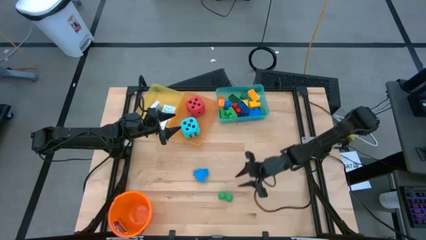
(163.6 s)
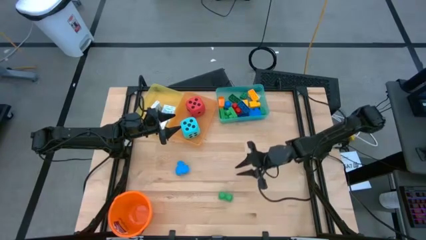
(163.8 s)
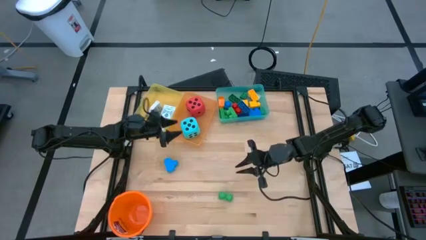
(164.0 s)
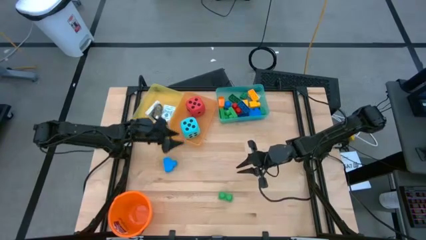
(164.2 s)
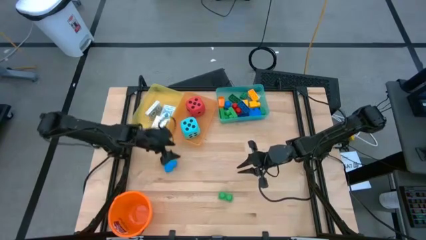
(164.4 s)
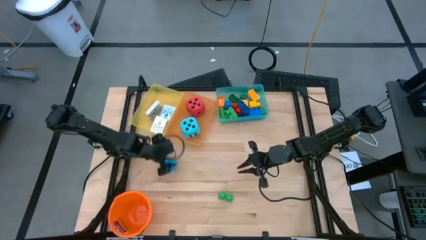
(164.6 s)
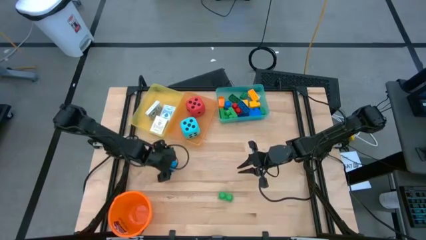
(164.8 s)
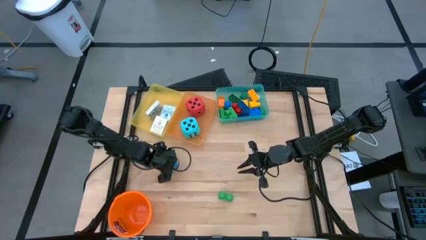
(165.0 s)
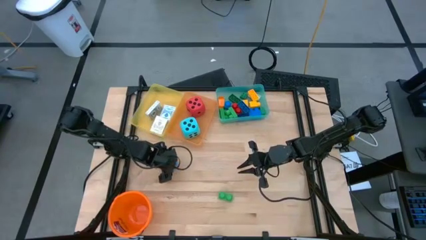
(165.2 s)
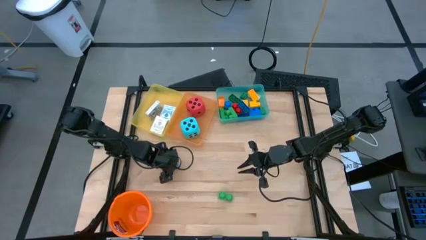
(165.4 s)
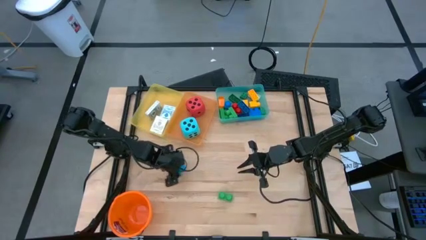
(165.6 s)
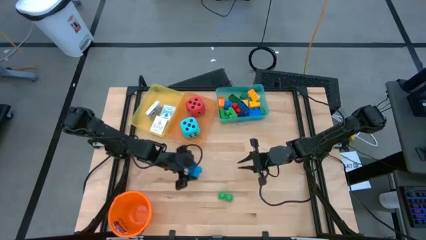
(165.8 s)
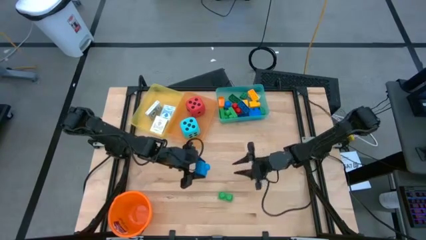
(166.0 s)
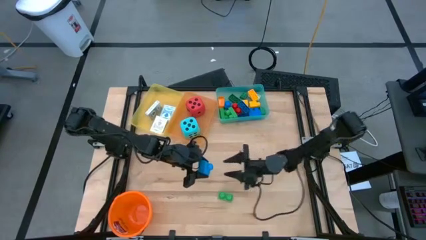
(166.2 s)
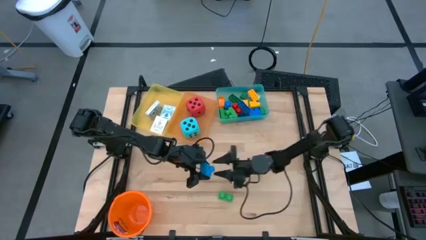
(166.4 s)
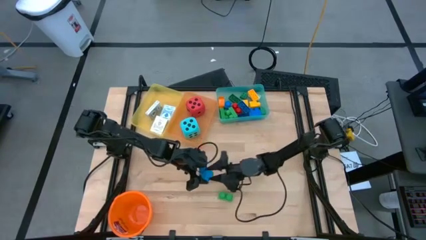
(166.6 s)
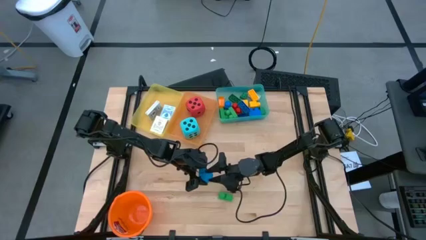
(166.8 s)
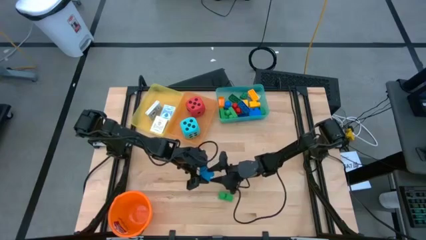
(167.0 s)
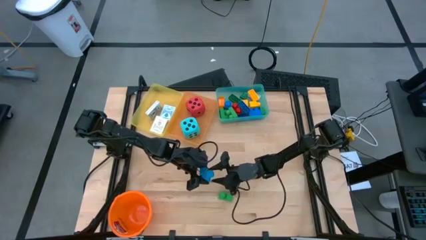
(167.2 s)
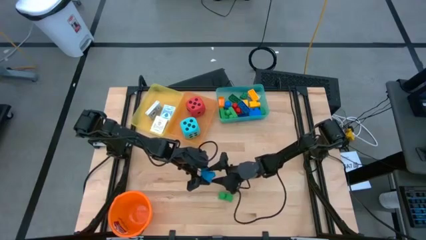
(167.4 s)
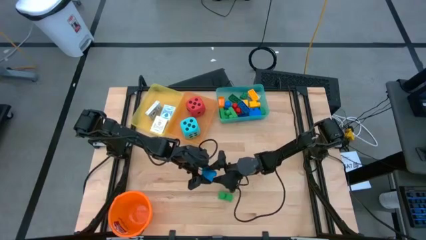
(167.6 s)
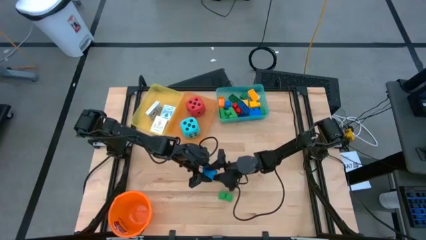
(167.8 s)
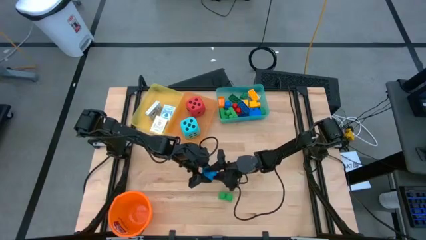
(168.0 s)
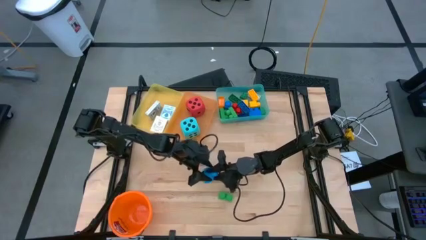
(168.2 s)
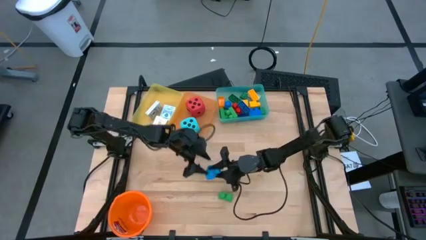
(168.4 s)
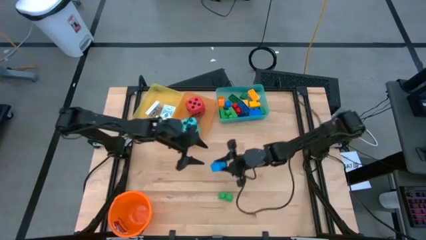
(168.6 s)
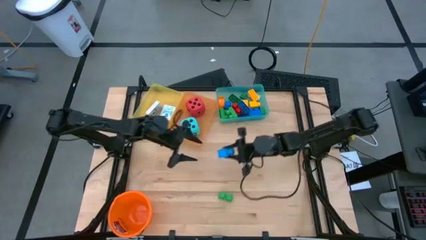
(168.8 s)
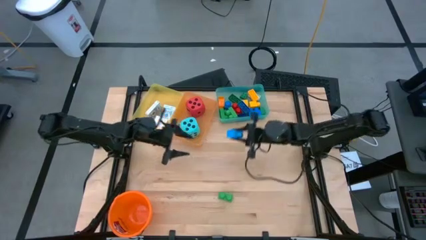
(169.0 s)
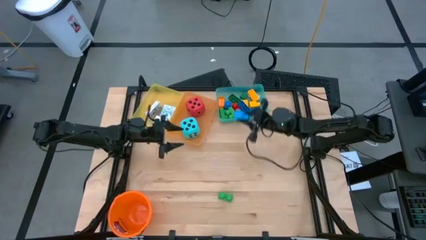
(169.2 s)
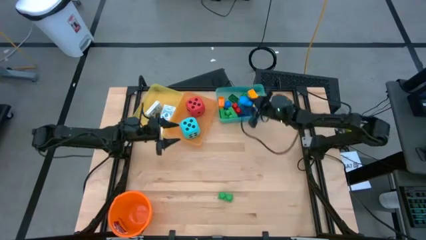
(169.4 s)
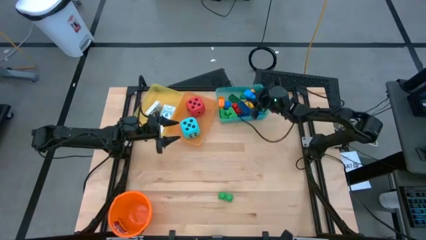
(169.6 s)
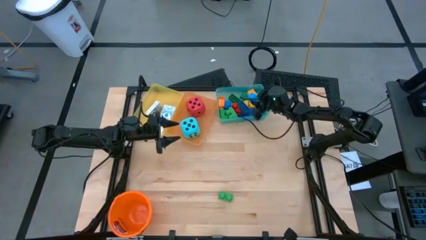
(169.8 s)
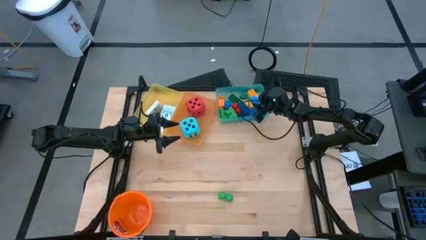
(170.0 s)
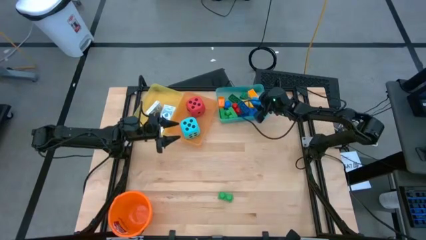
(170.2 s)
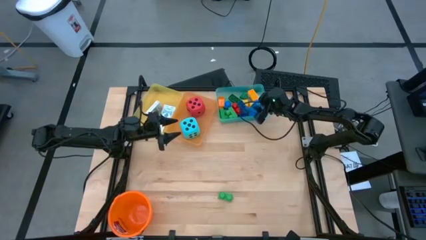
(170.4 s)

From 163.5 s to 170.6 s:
Task: Pick & Place Toys
Put the blue game piece into the blue bin

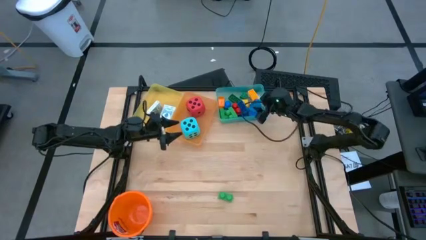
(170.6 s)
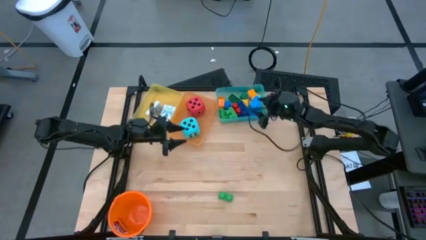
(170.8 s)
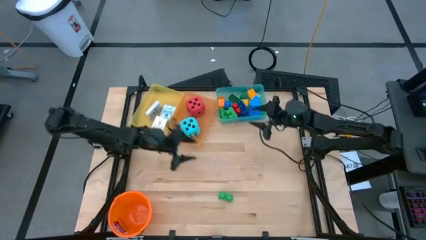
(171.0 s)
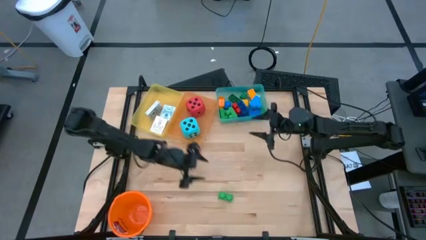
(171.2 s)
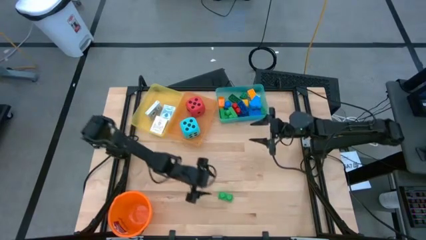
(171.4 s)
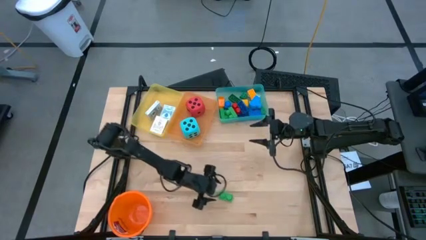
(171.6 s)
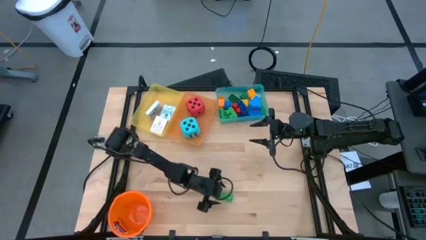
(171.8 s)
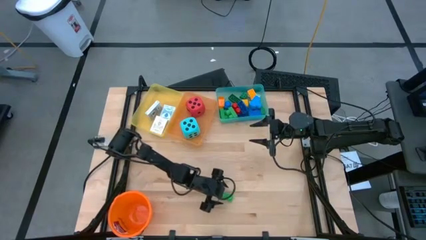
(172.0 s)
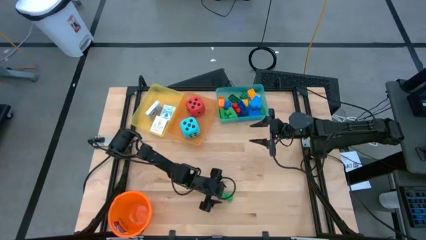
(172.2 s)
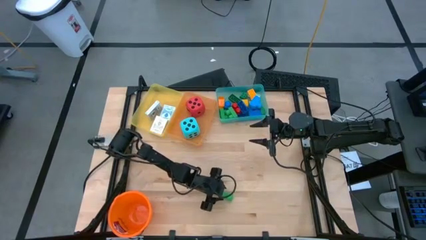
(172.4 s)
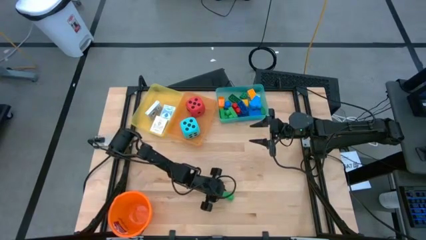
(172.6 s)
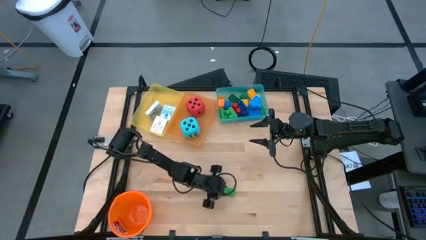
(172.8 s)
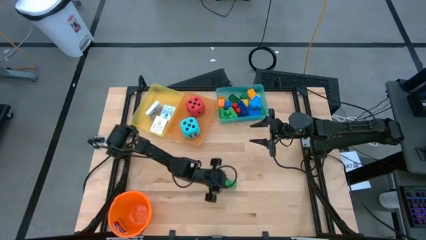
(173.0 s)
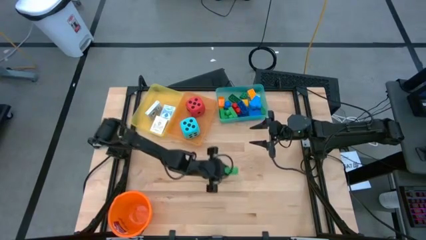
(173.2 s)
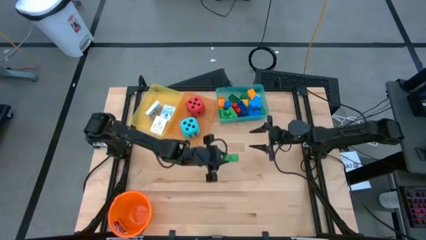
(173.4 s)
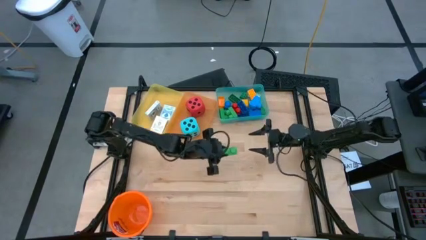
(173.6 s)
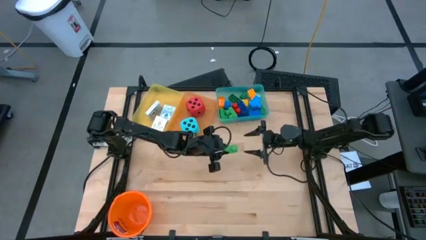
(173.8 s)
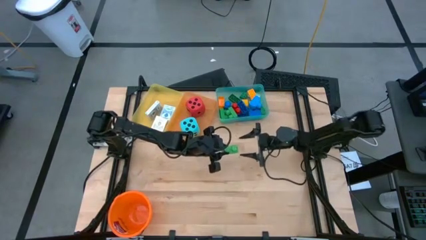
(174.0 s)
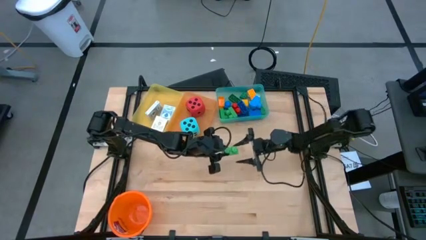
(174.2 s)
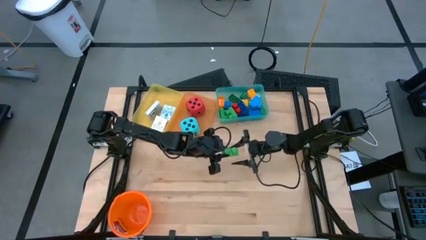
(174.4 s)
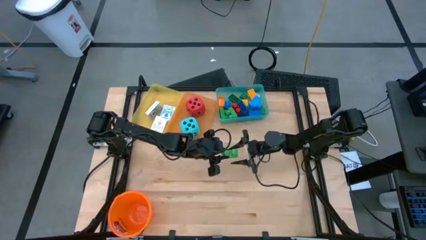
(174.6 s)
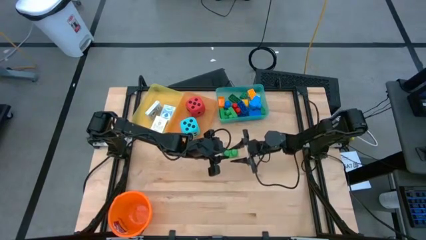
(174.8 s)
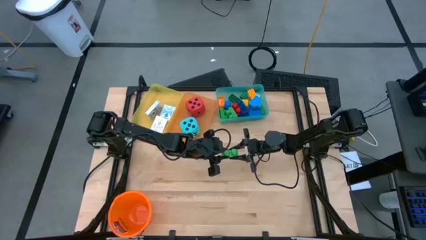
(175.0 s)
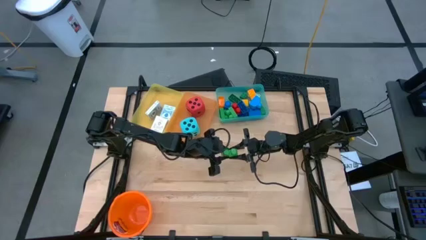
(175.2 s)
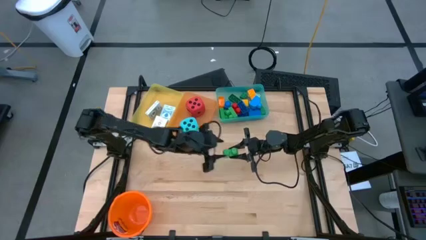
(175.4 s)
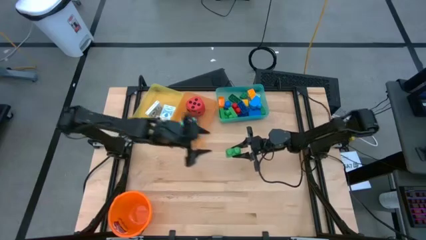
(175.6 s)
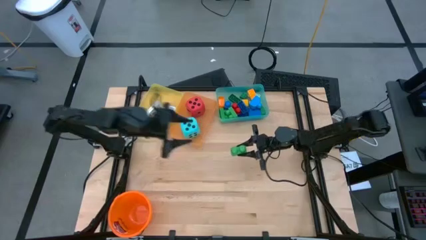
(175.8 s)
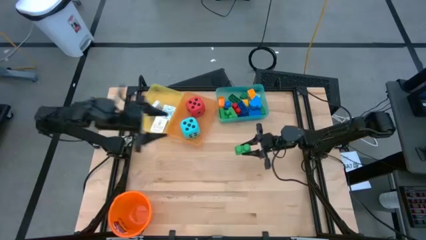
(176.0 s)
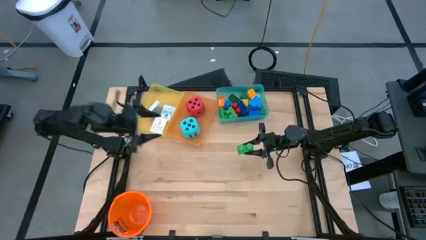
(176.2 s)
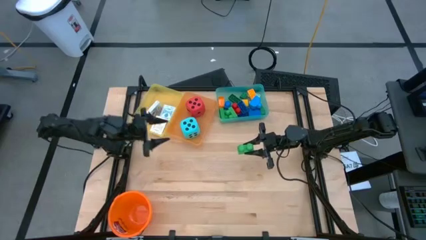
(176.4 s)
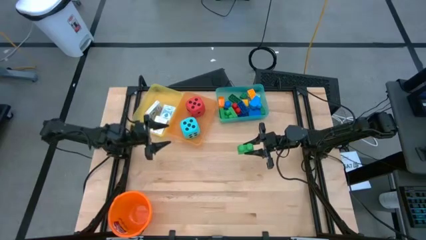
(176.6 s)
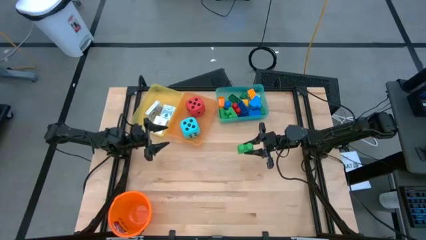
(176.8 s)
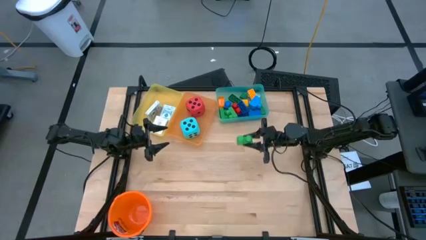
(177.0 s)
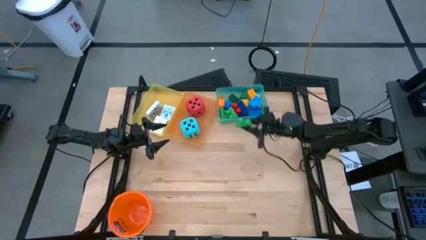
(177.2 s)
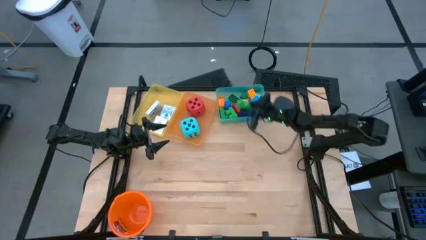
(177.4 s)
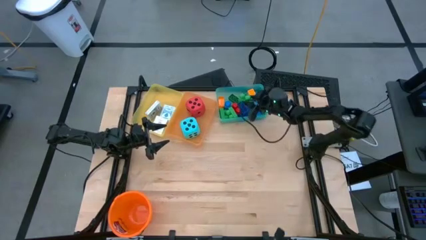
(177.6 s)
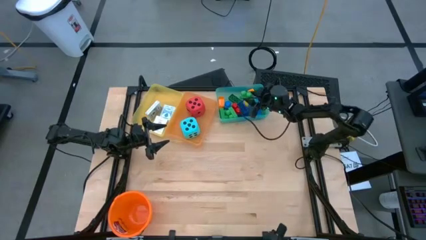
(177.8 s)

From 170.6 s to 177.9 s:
Put the green game piece into the blue bin

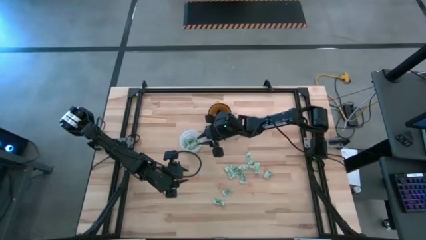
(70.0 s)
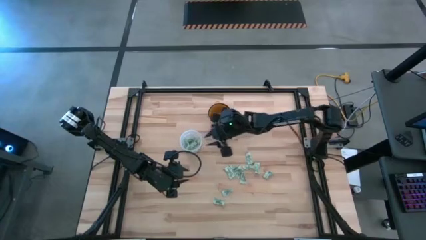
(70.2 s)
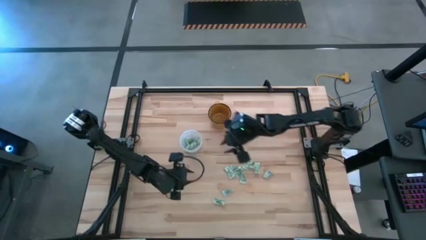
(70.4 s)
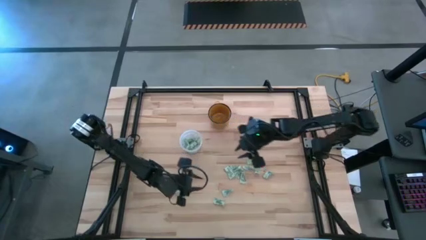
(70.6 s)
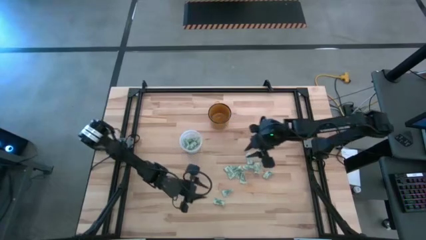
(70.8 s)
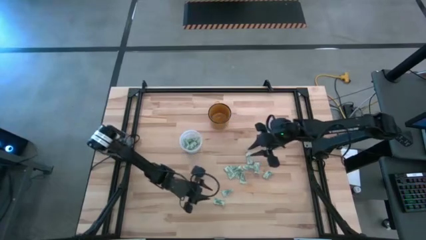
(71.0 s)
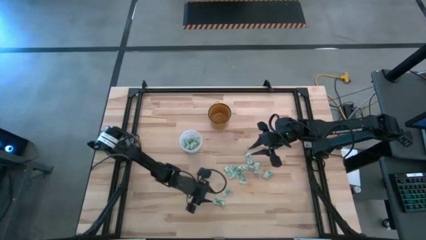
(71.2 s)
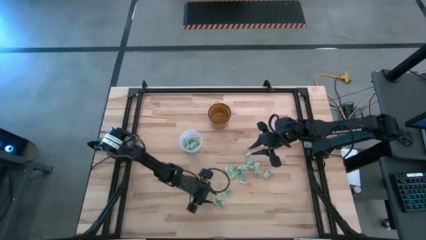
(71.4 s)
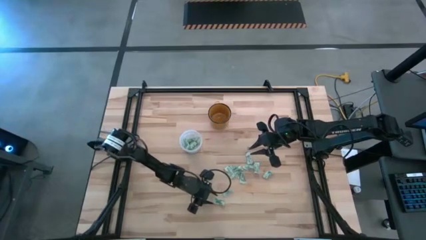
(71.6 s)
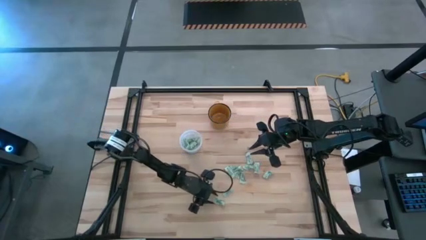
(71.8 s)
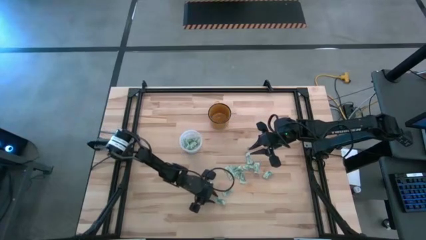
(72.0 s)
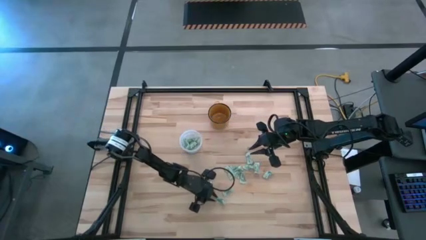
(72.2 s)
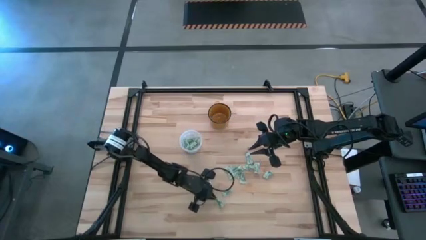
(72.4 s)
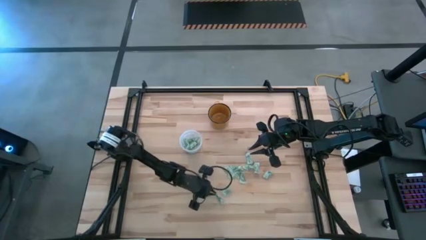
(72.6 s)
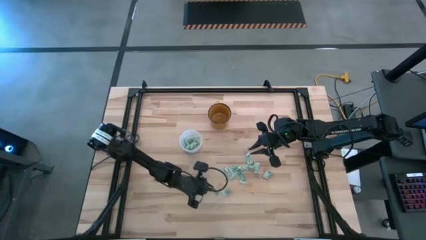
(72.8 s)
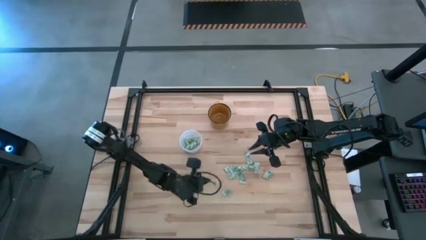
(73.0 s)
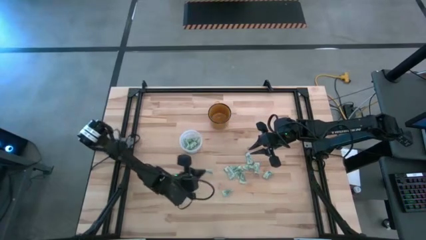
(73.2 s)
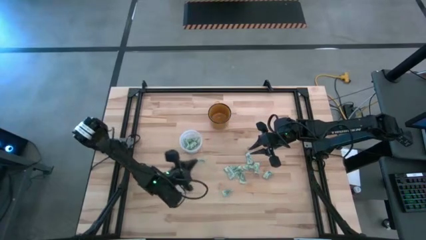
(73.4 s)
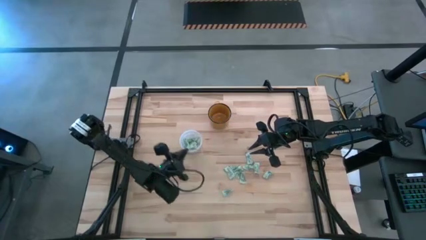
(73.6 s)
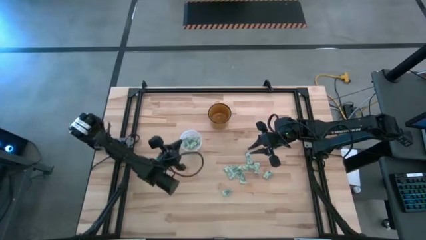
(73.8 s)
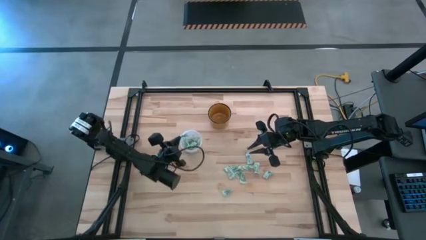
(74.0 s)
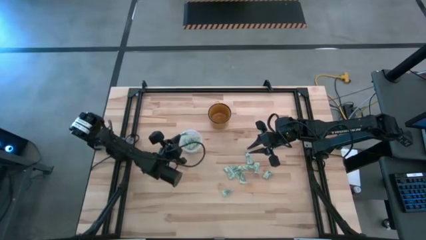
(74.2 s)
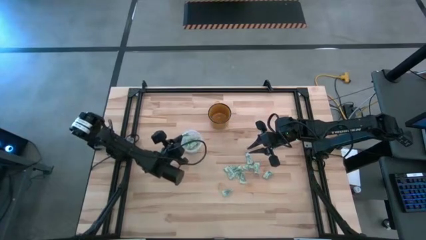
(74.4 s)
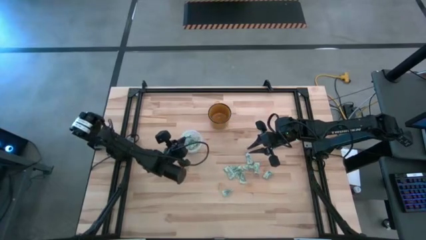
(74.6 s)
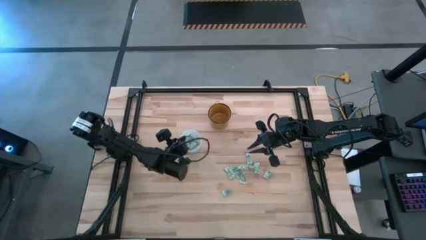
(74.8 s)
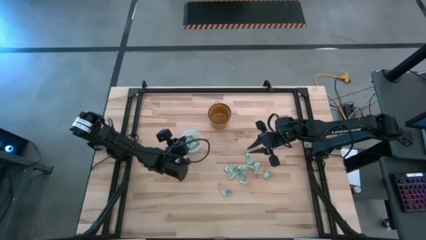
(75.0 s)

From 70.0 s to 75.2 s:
Task: Pick and place Stevia / Truvia into bins
Put the stevia packet into the transparent bin
